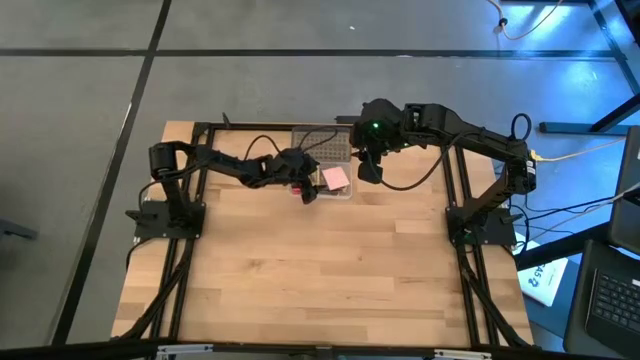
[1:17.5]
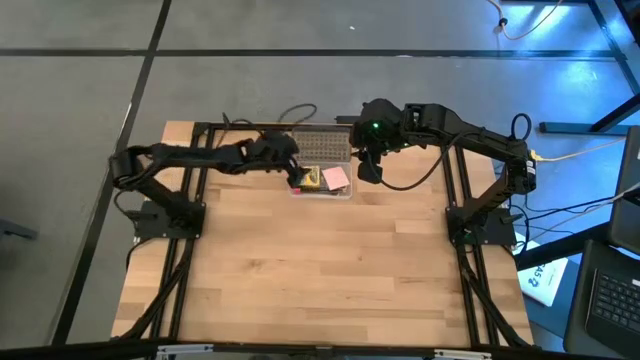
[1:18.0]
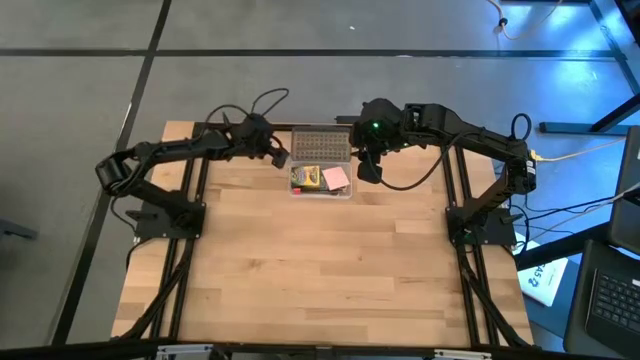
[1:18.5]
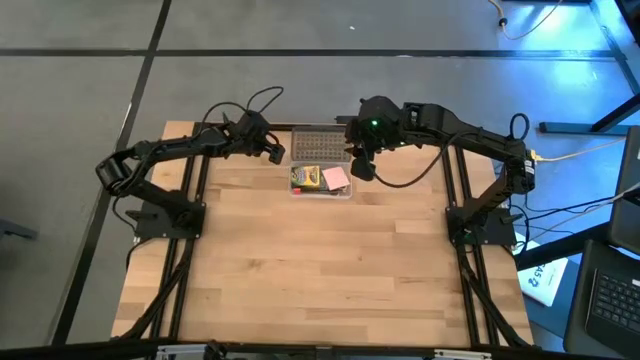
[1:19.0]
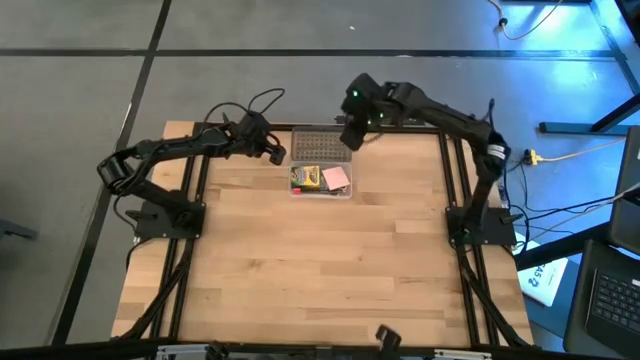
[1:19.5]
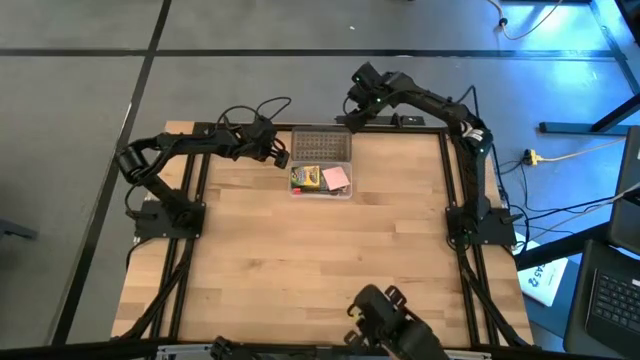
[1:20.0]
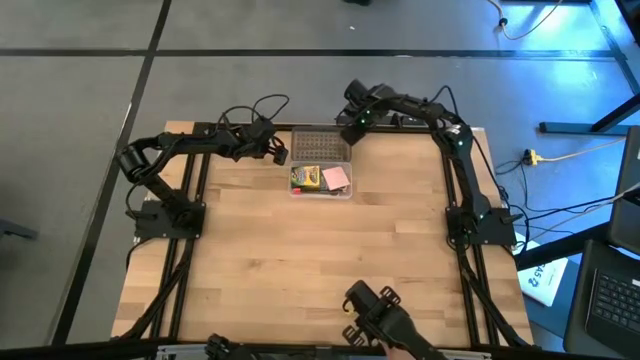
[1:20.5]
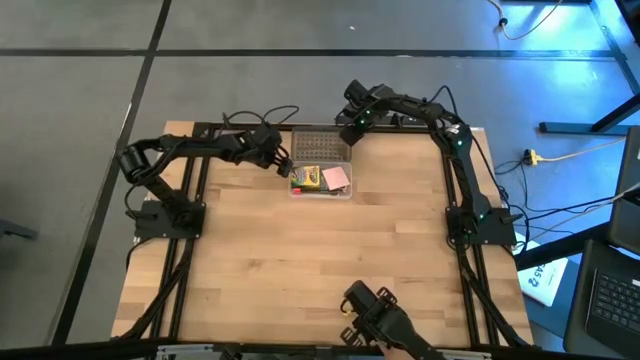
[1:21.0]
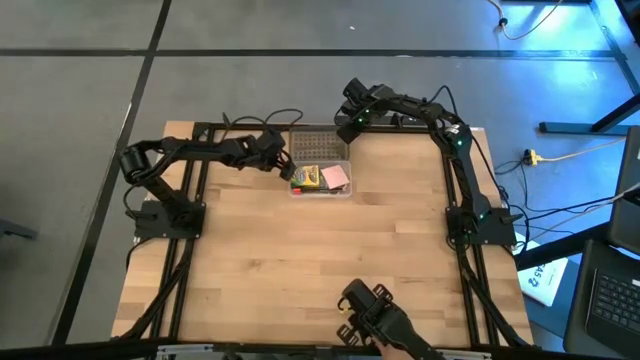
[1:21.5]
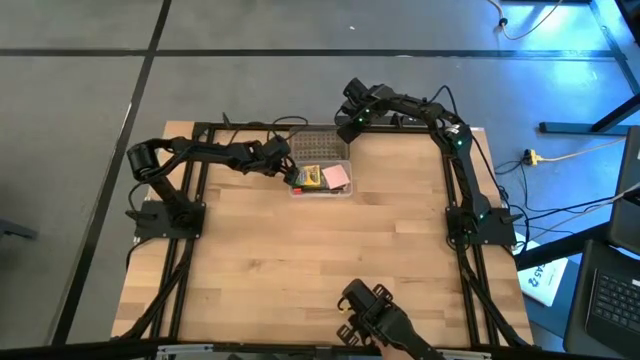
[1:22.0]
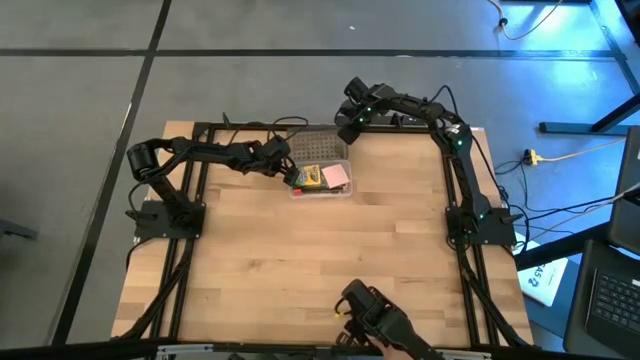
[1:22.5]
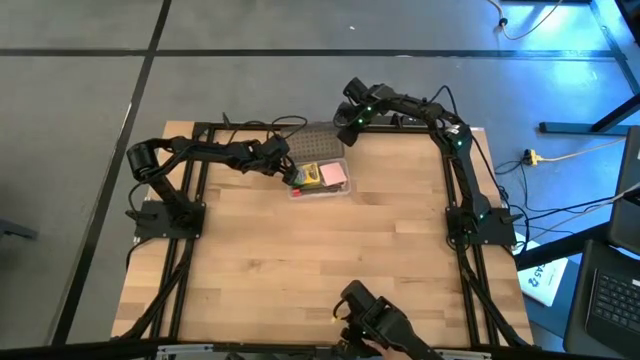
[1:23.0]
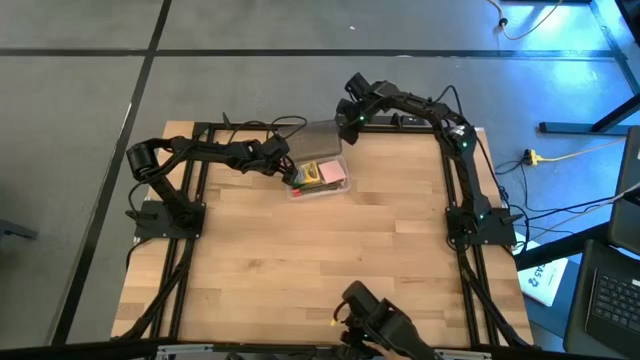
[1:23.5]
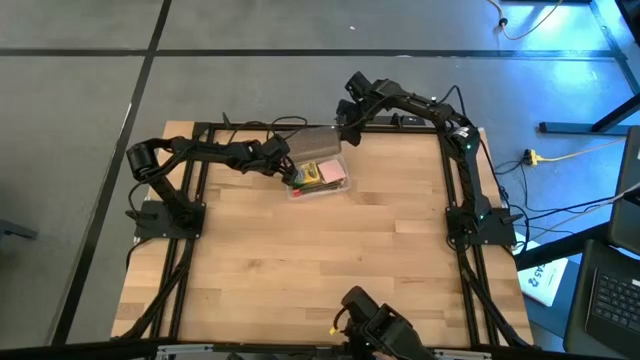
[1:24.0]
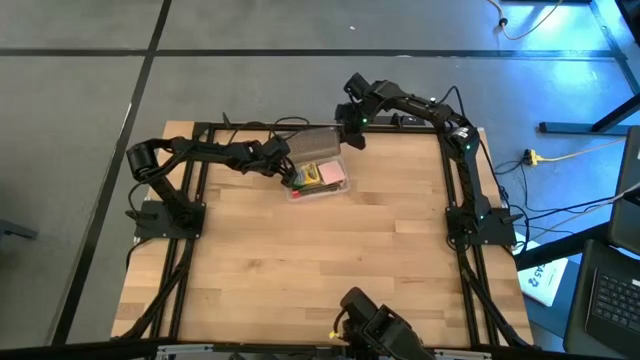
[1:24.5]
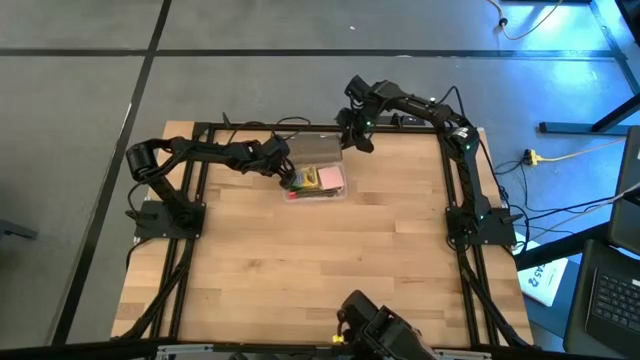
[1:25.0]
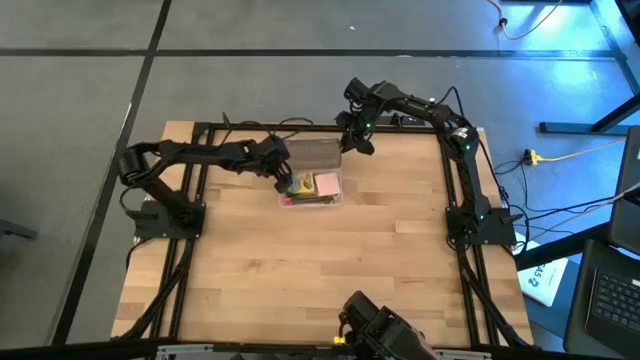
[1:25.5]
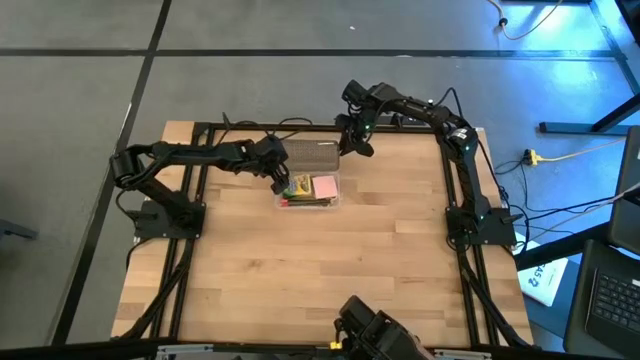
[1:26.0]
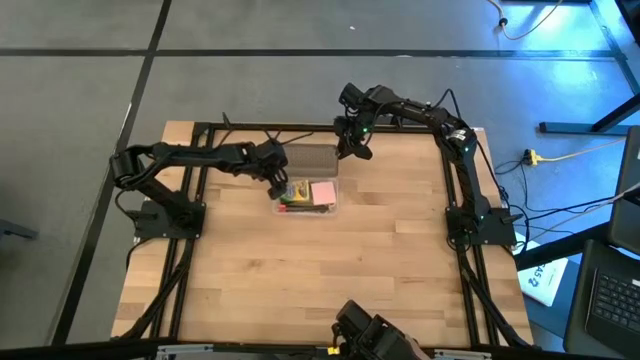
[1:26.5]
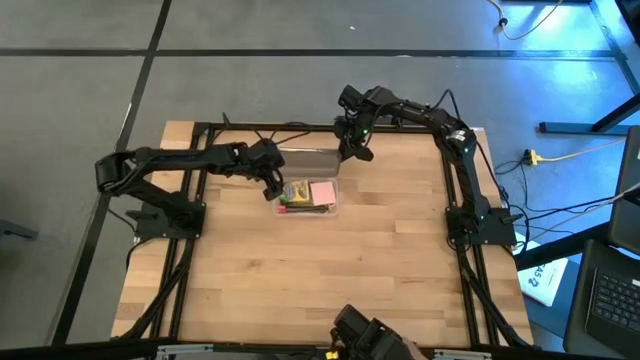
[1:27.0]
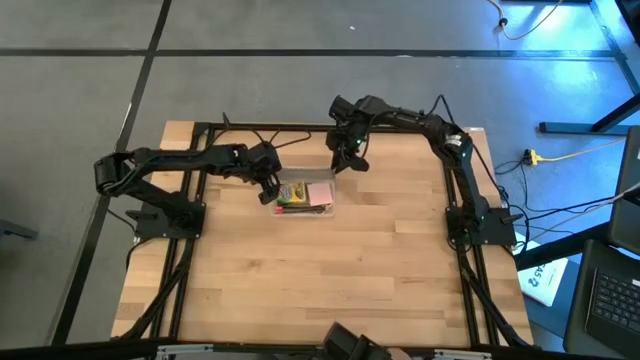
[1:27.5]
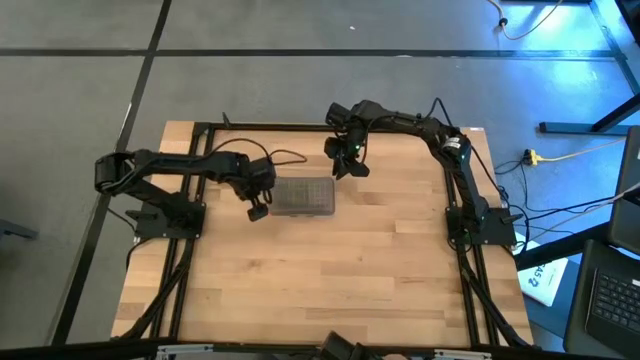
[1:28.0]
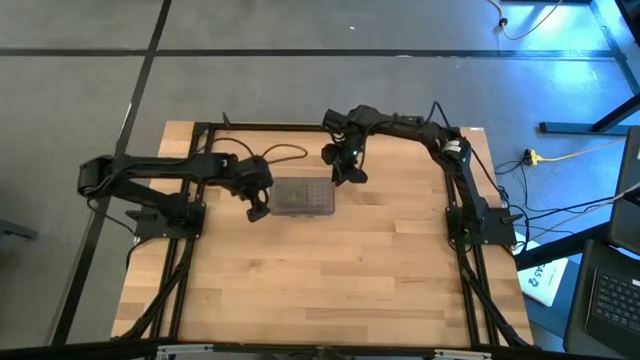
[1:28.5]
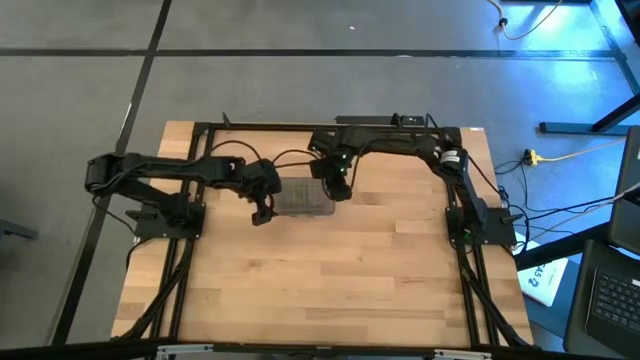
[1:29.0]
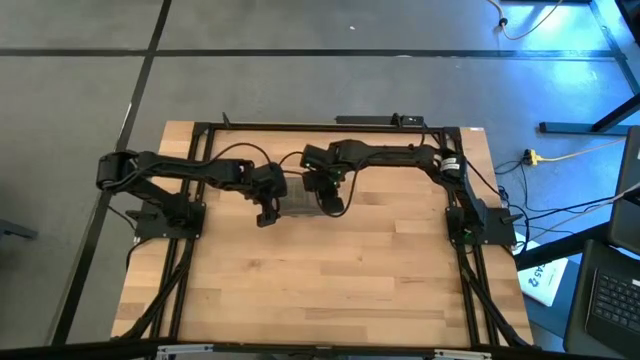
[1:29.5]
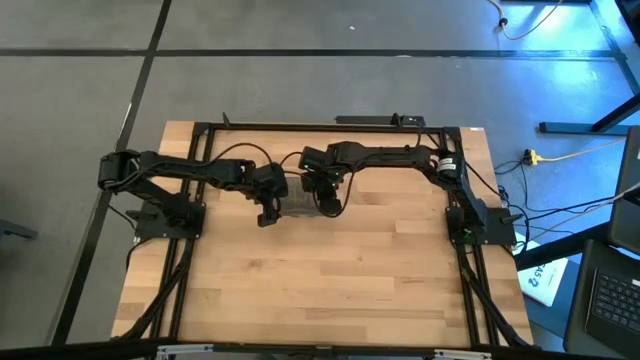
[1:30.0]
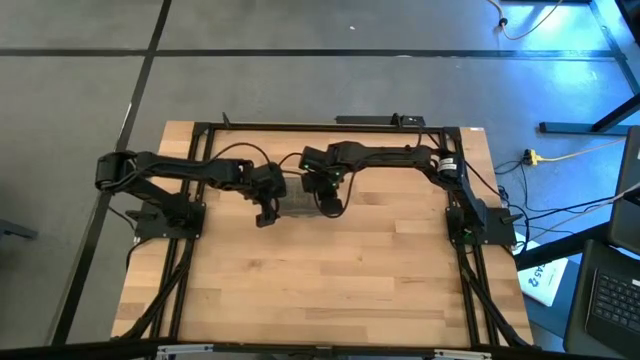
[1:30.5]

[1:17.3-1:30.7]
Task: Pack school essentials
Close the black supply box

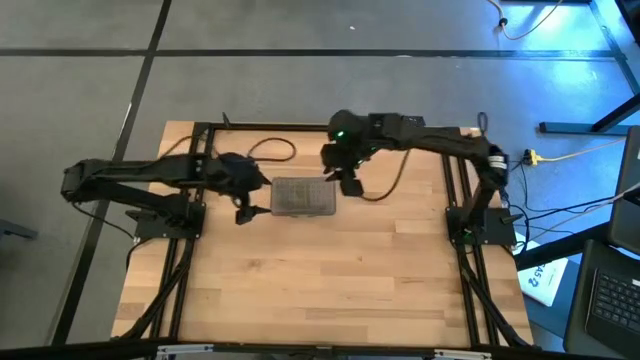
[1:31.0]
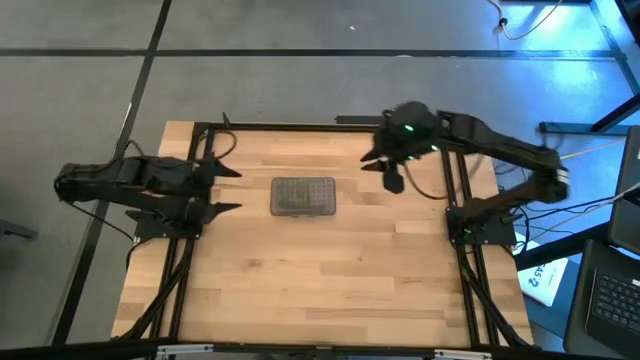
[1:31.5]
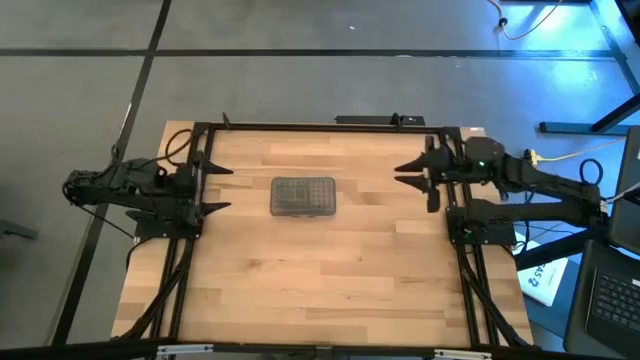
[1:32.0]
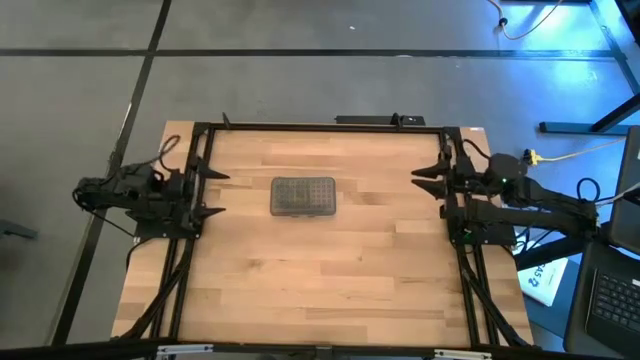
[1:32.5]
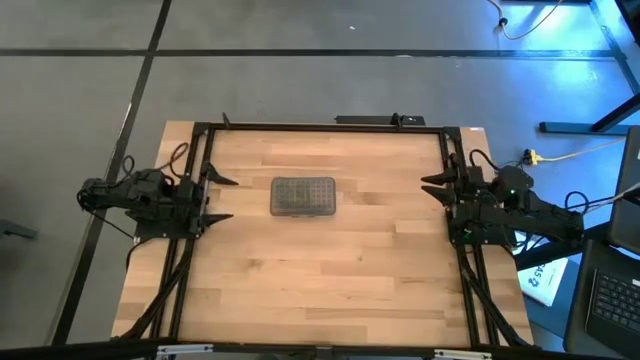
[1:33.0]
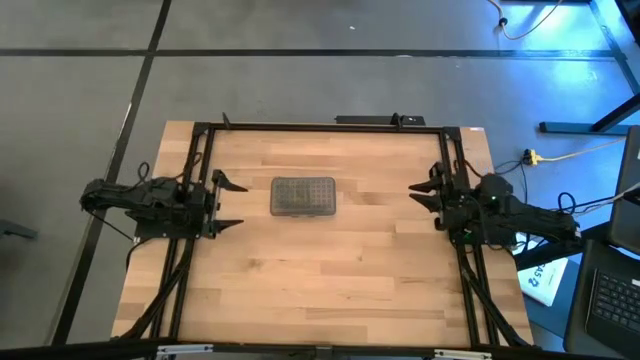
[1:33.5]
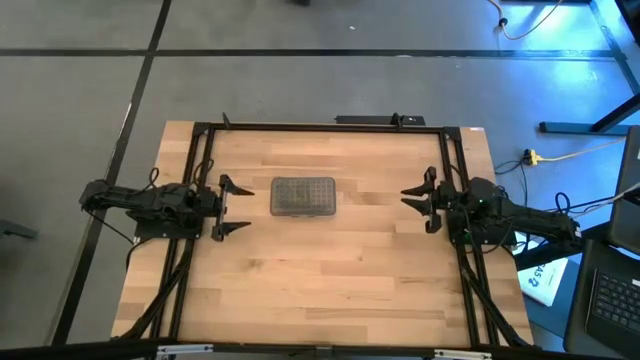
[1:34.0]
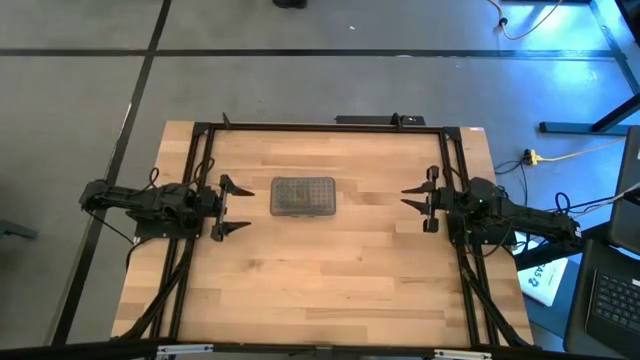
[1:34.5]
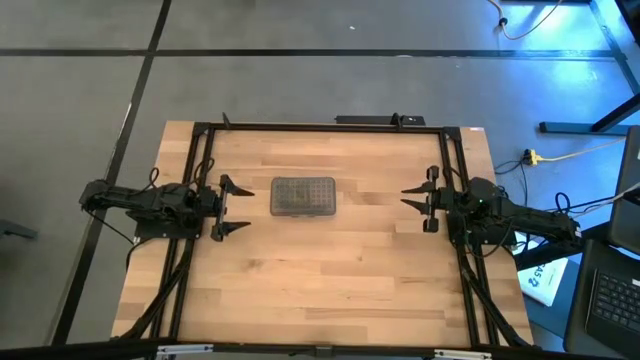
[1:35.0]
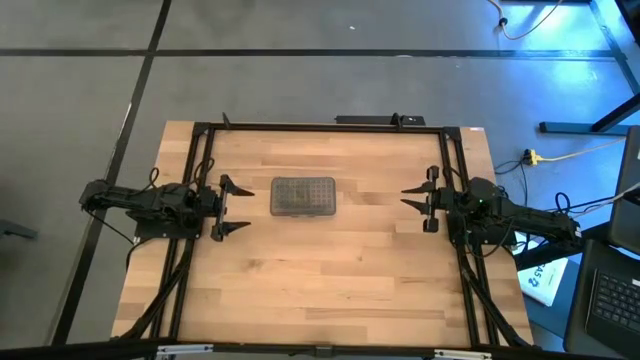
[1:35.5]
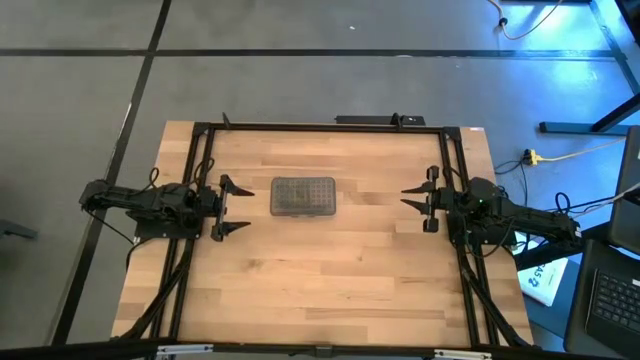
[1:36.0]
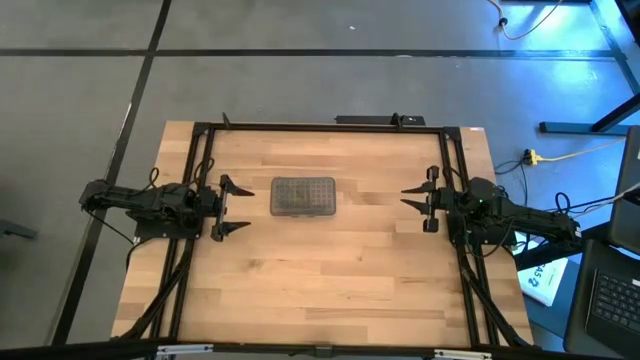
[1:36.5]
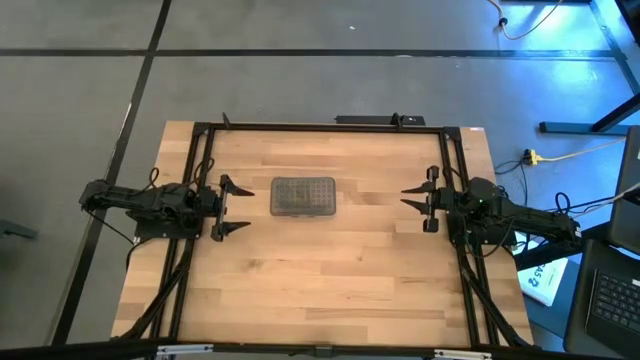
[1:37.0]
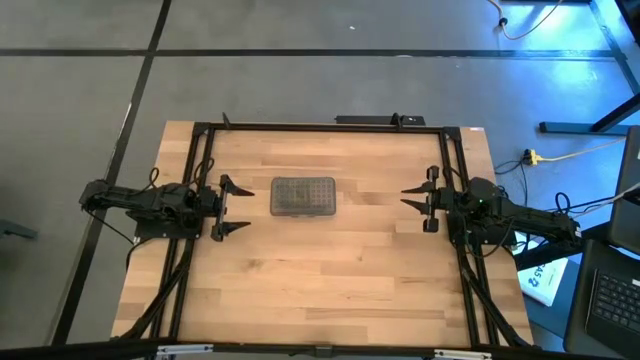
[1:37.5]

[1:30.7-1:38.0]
Return to Home Position
